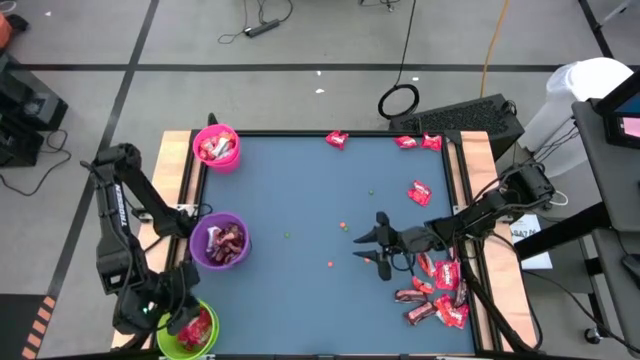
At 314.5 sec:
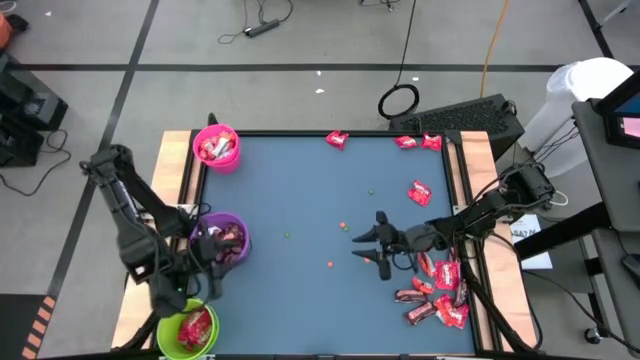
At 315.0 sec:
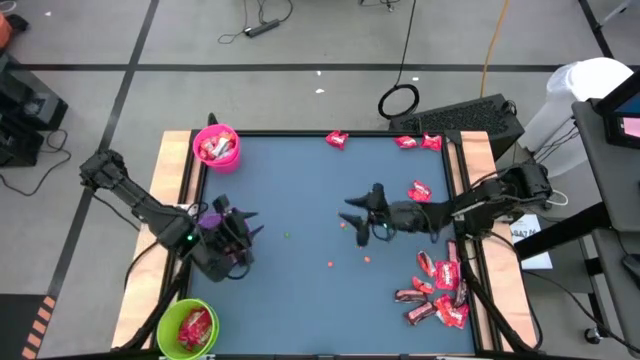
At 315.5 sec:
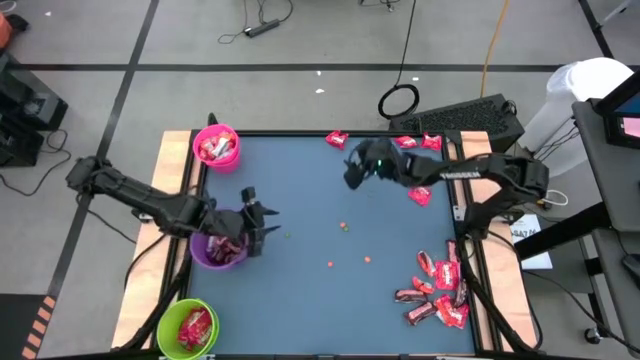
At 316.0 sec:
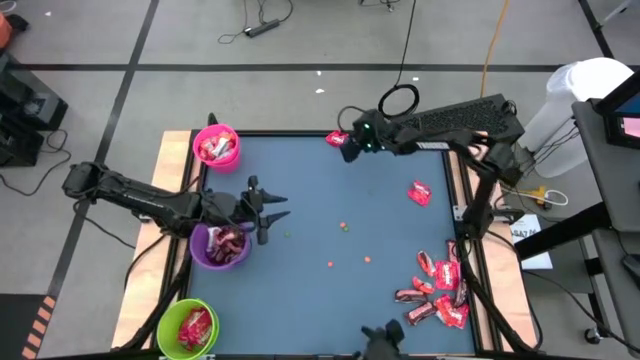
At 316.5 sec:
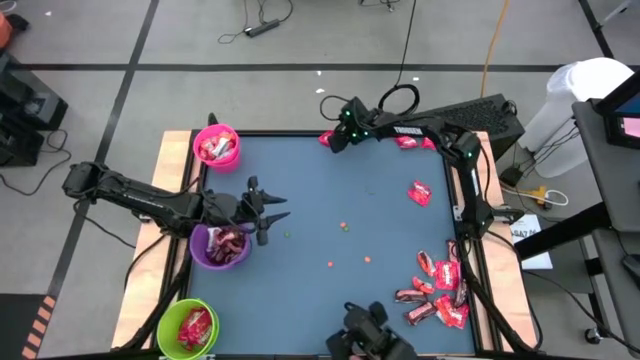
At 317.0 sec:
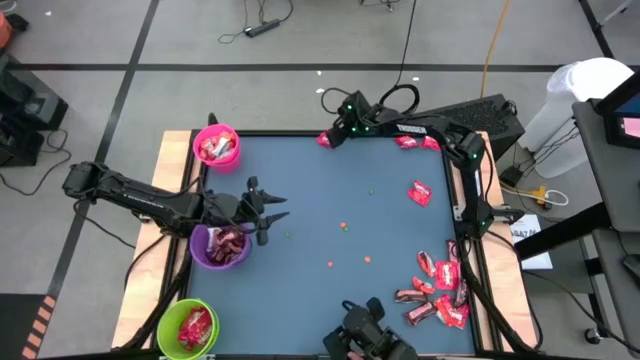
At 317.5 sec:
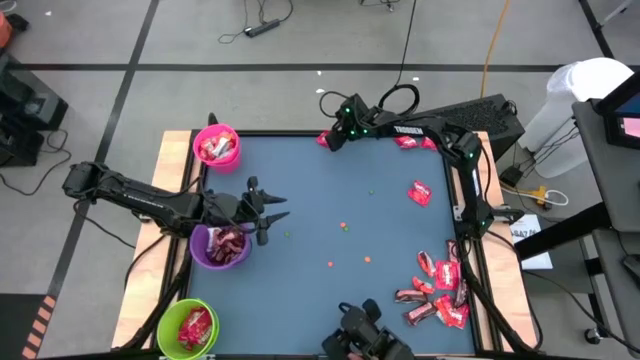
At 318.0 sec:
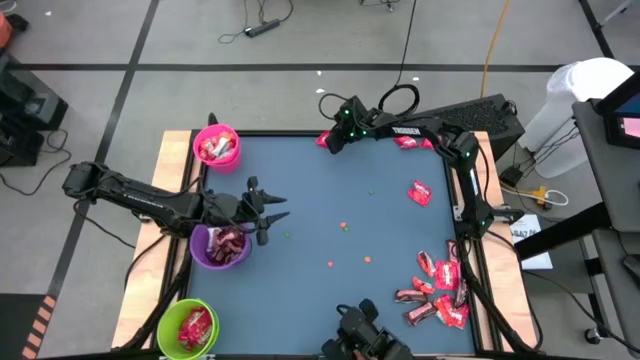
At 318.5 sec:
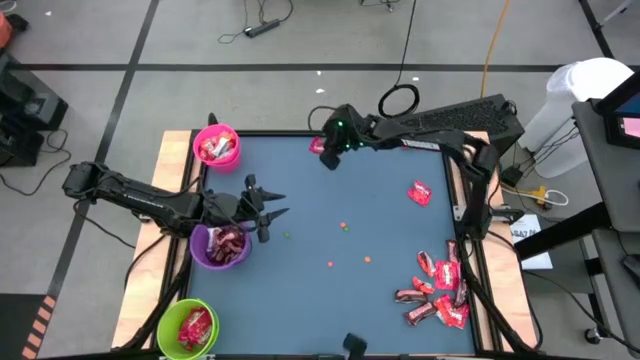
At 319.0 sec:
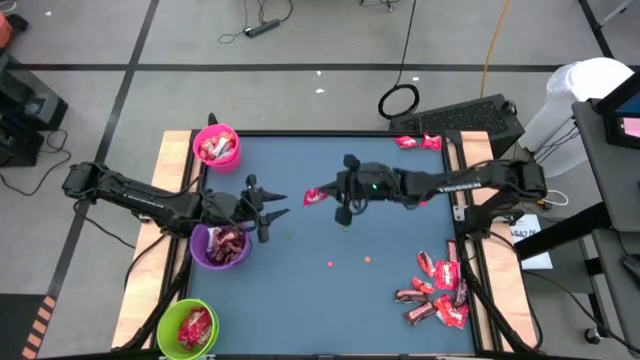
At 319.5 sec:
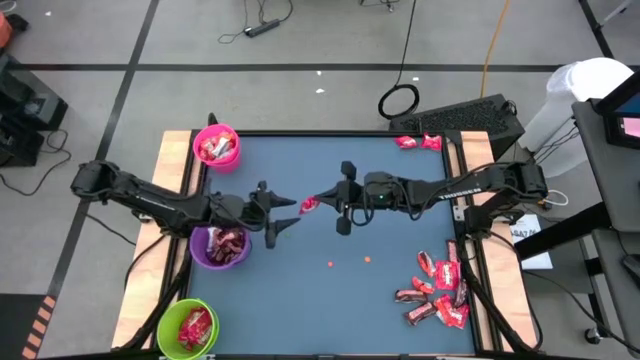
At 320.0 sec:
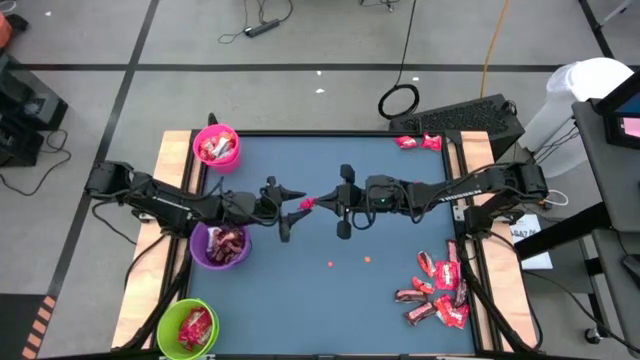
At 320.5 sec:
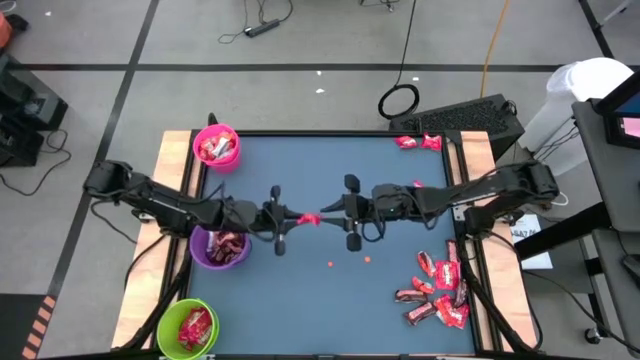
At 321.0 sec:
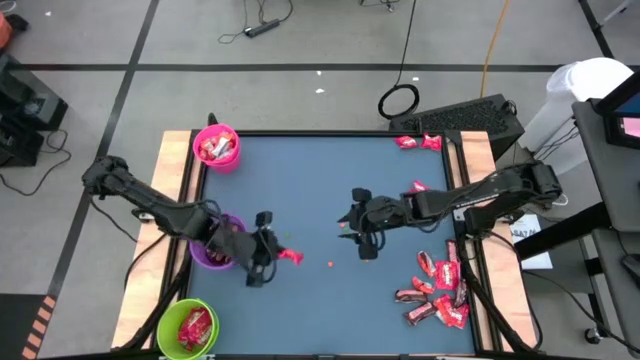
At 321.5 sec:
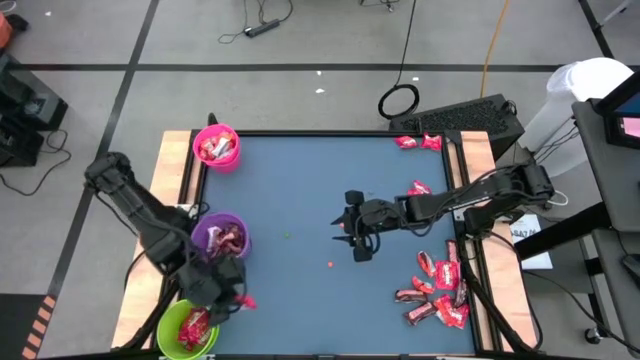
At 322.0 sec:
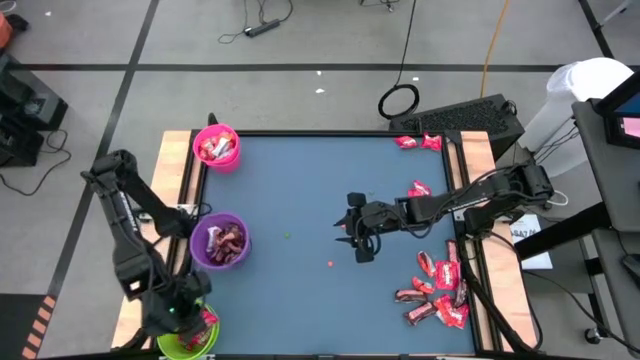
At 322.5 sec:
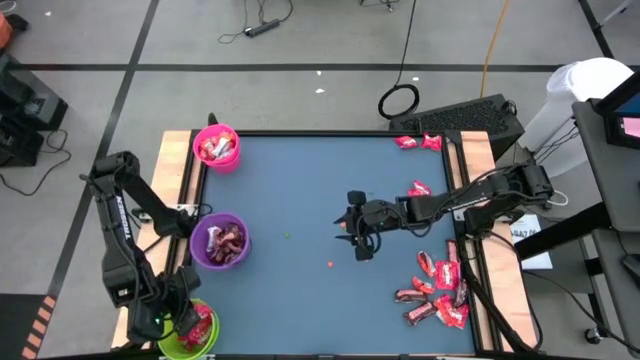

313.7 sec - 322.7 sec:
Task: Organize candy in baskets
Put the red candy into the green bucket

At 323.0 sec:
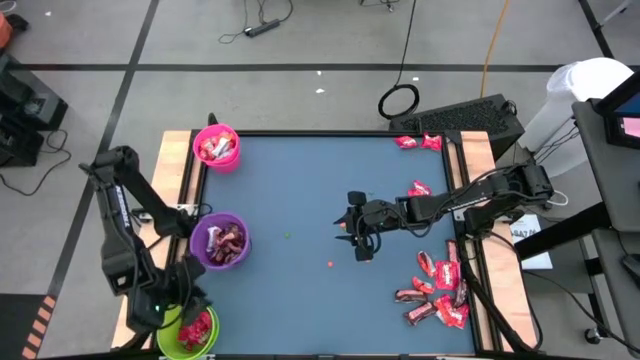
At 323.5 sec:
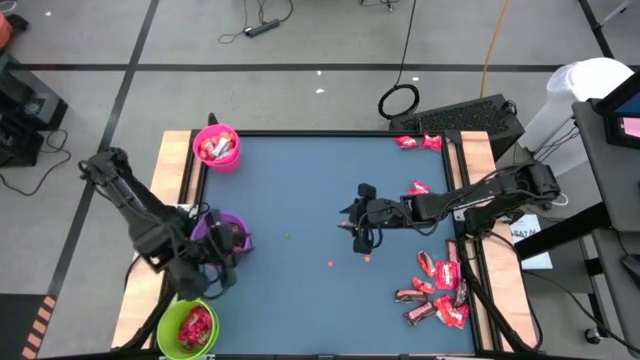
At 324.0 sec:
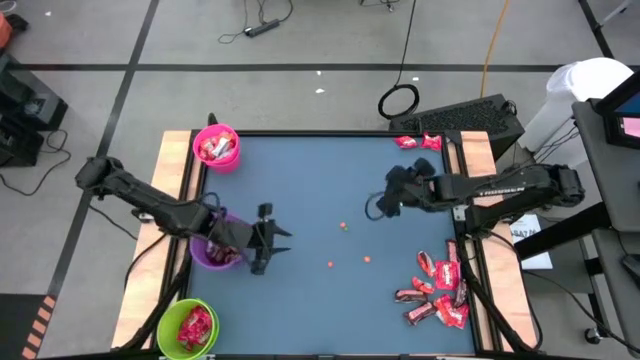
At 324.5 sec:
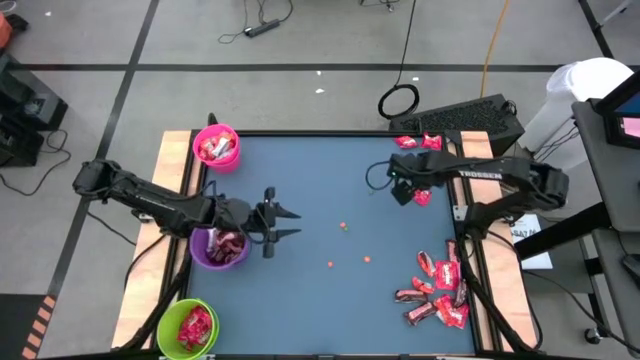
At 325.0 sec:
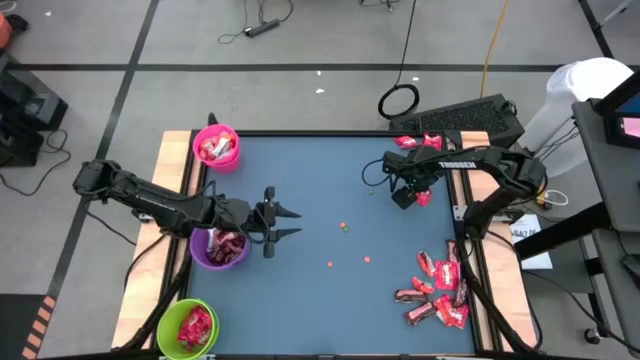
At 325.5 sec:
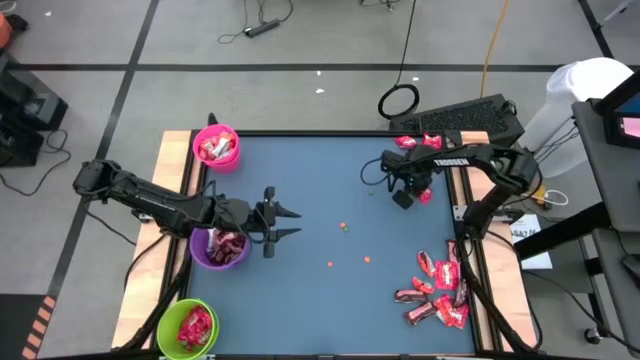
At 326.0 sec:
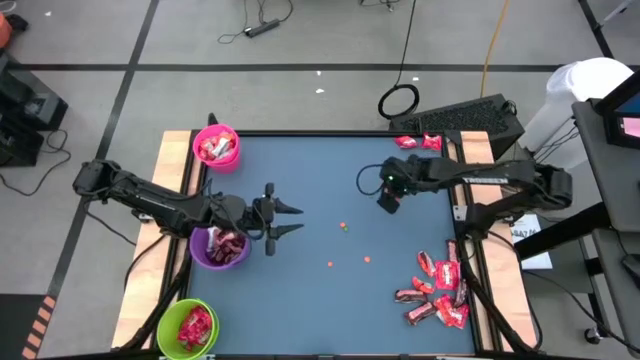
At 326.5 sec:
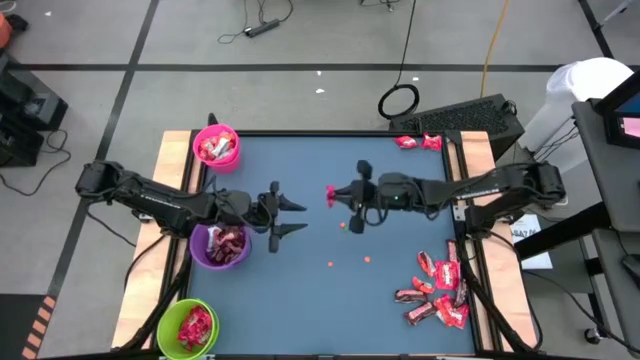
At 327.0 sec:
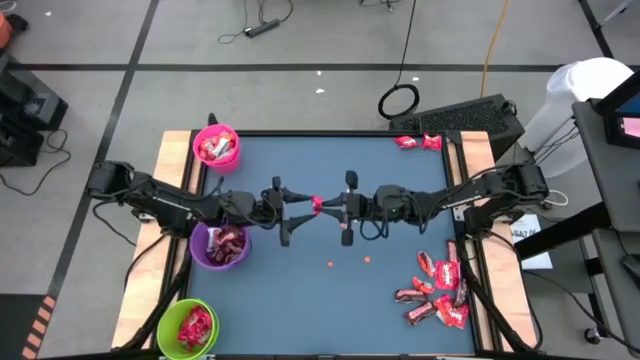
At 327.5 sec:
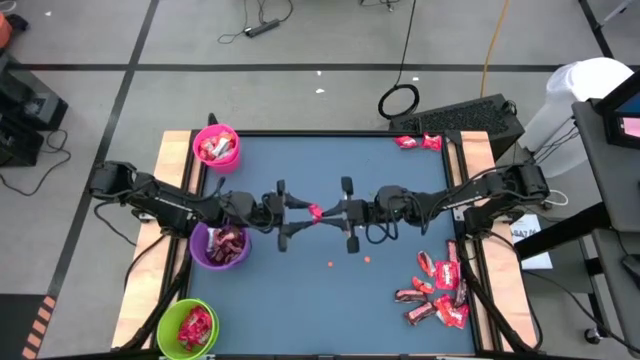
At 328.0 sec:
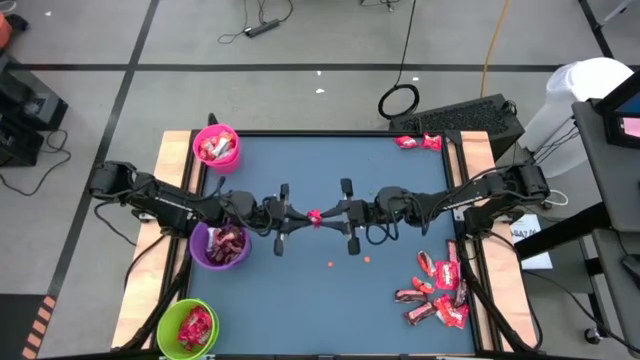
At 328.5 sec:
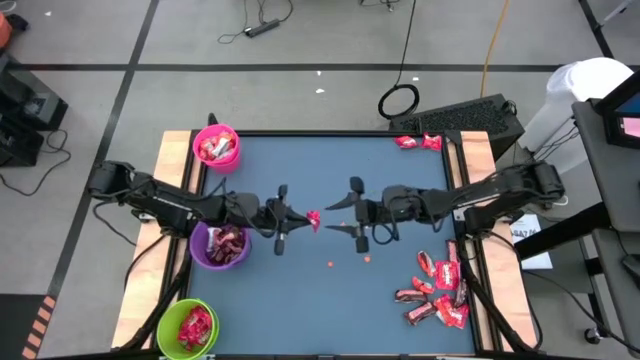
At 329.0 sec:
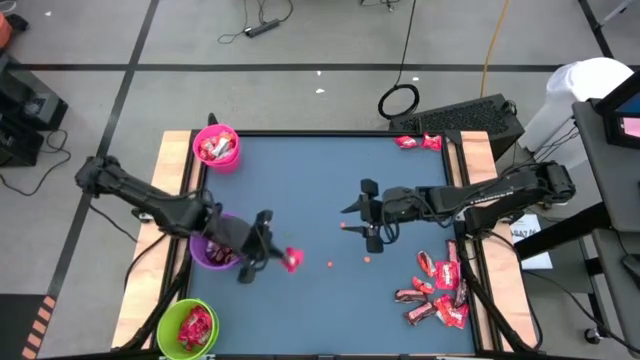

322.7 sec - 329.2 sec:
Put the red candy into the green bucket

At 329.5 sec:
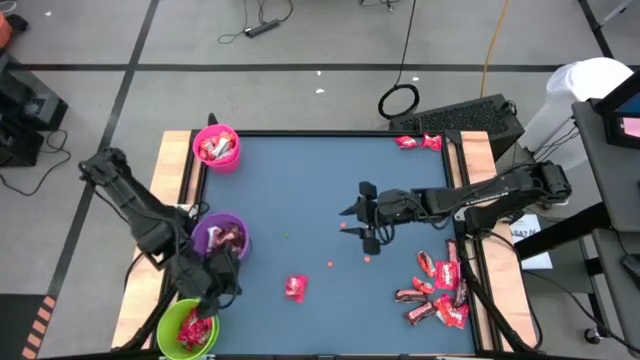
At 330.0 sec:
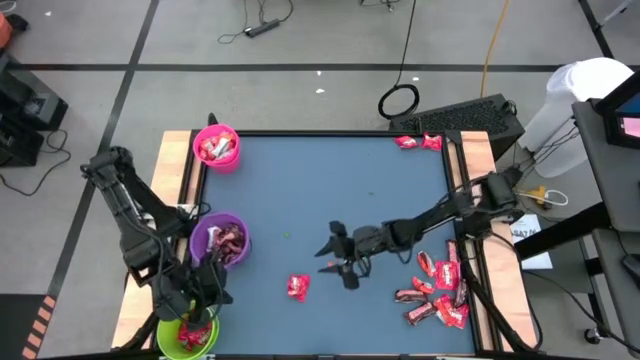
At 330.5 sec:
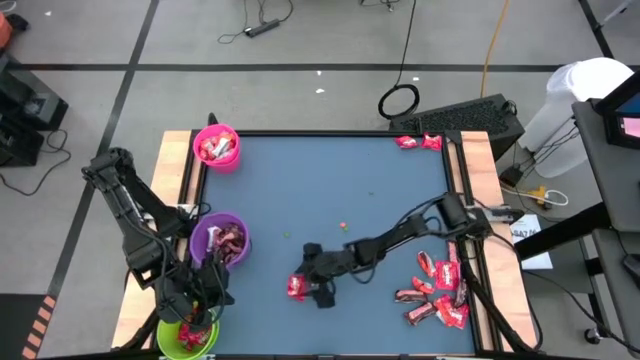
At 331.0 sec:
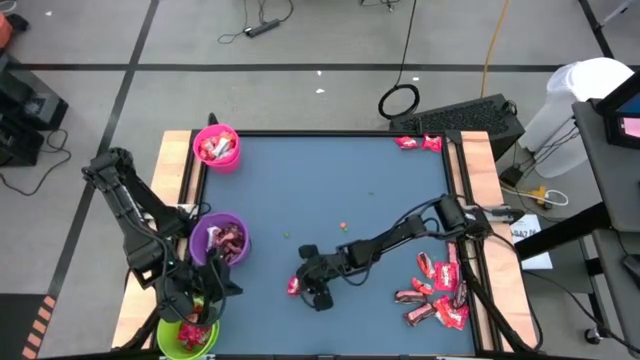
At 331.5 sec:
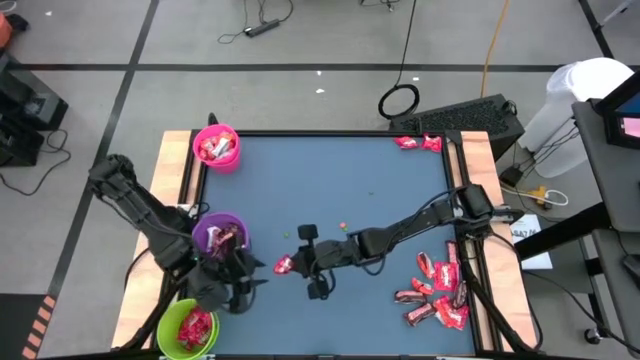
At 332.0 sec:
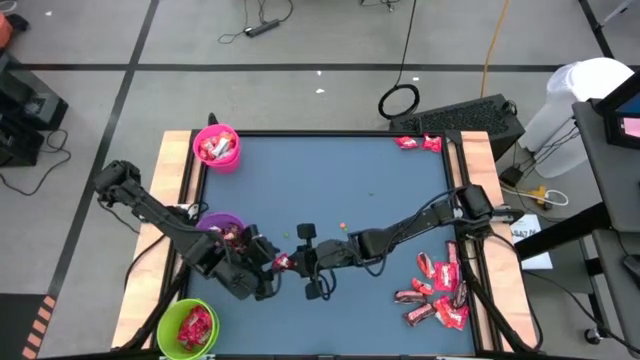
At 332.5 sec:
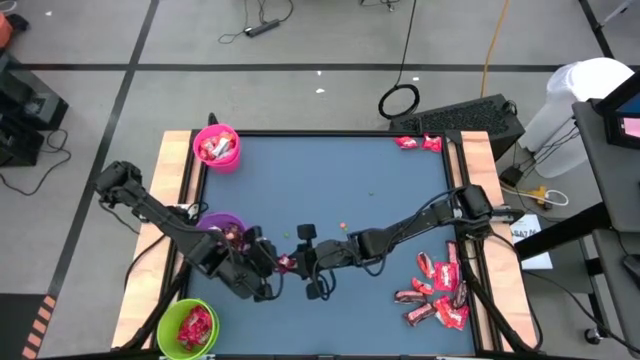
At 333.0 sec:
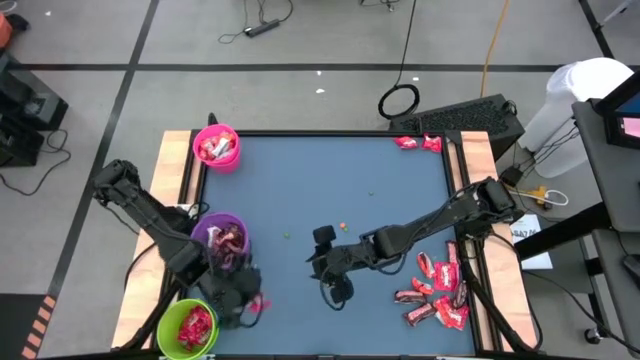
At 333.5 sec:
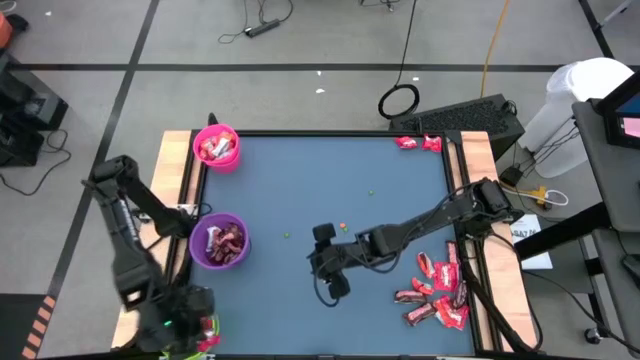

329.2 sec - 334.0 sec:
Put the red candy into the green bucket
